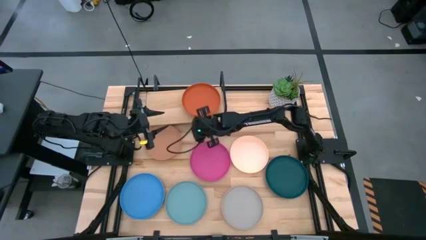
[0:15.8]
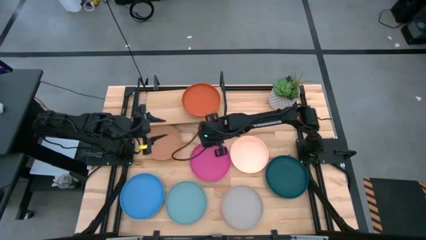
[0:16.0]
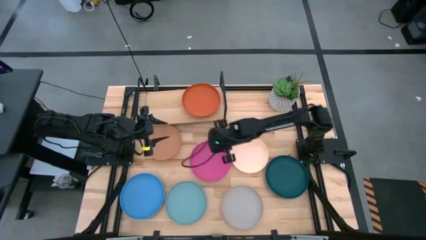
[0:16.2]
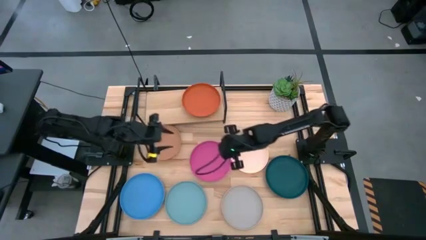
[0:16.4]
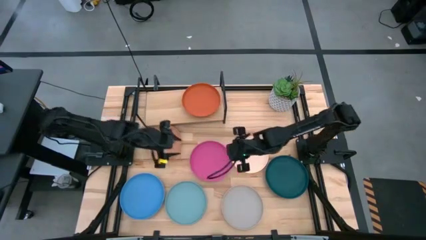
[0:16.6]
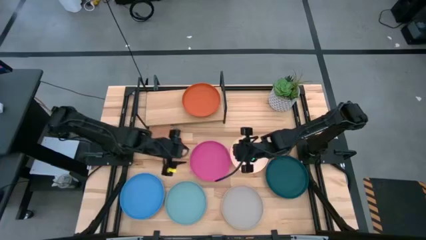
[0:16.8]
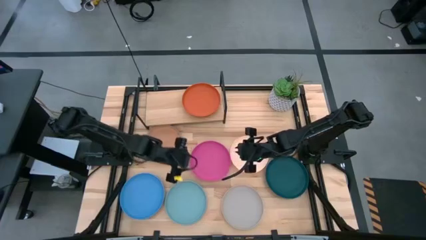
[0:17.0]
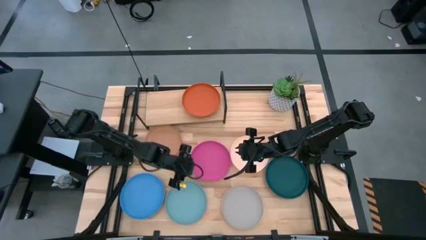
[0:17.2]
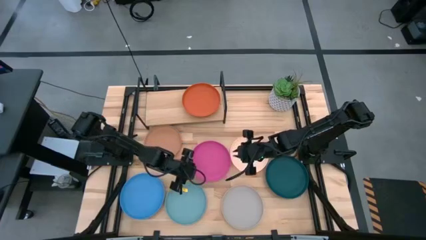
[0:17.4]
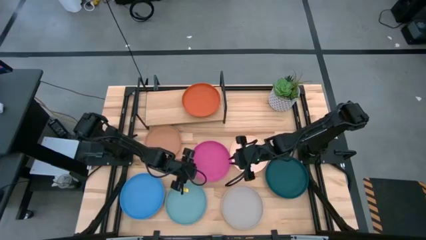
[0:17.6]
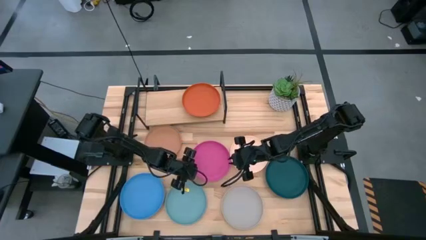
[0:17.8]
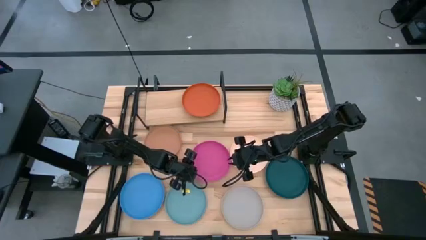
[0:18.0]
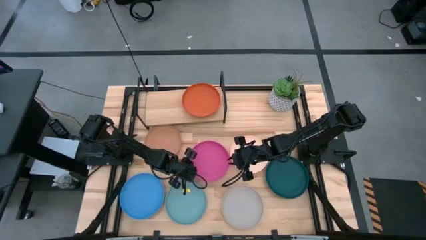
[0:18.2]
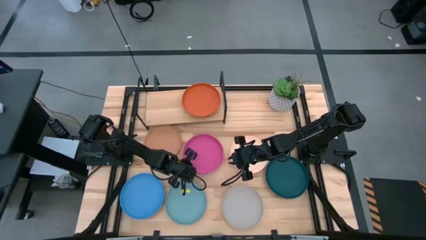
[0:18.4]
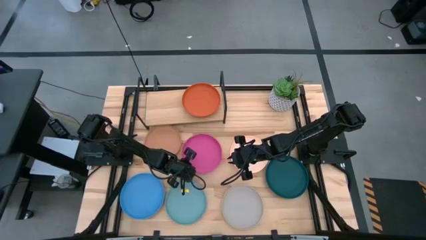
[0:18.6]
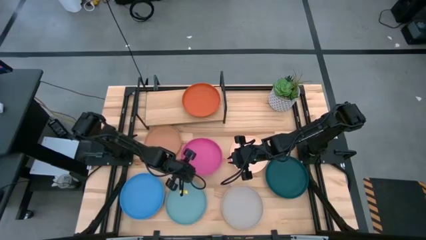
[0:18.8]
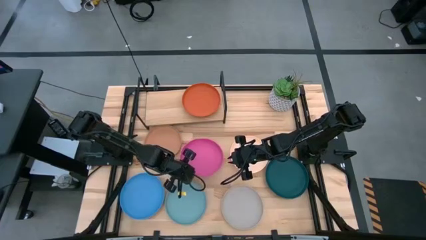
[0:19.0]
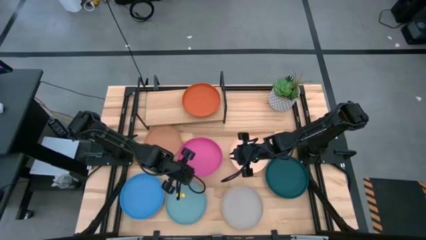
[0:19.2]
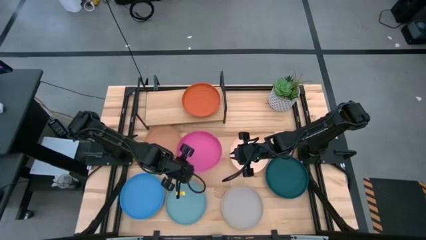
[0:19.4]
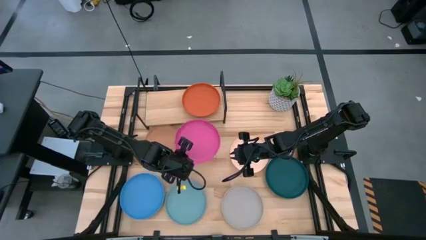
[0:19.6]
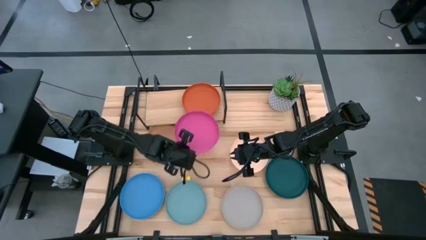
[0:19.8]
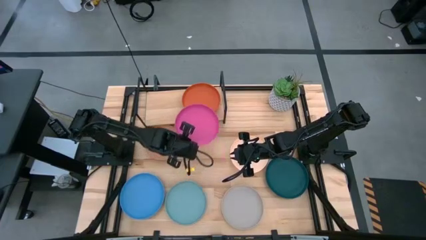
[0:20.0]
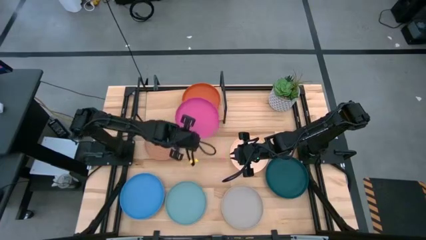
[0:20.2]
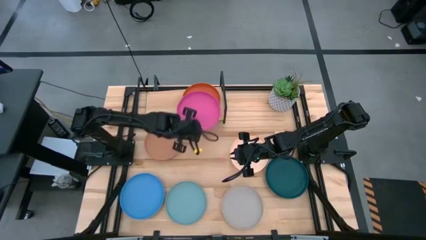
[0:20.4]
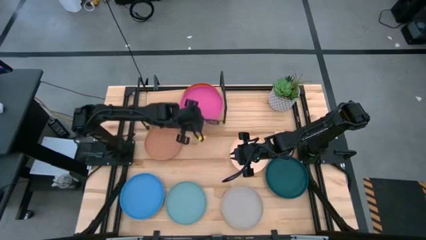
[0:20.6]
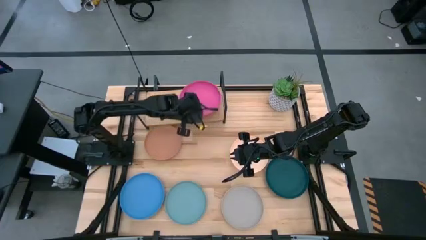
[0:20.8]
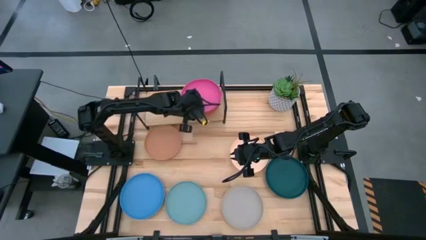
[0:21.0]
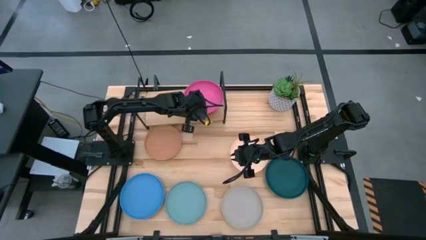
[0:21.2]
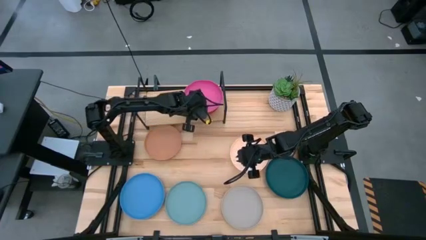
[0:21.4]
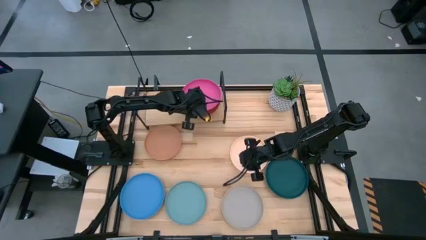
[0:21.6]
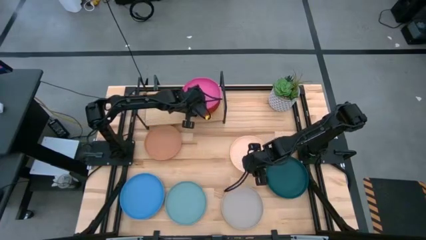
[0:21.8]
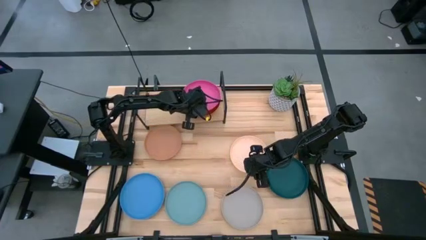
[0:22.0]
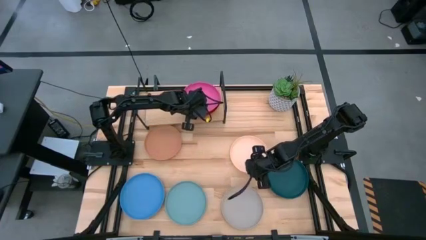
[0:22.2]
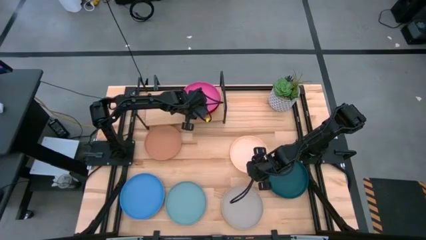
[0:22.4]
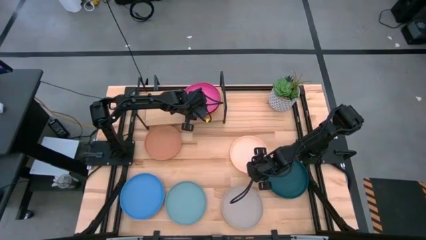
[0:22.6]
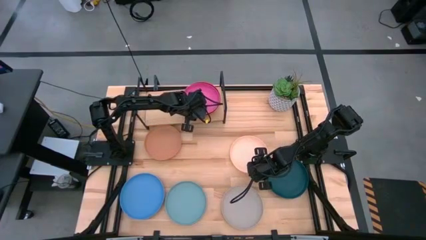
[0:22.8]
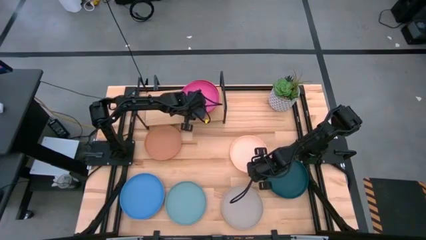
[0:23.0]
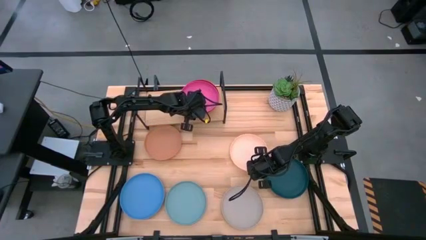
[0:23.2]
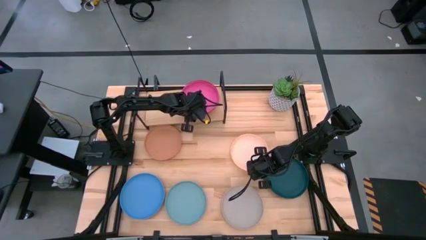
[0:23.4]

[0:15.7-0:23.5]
Task: Place and stack plates onto a shelf
Stack the pink plate on the orange plate

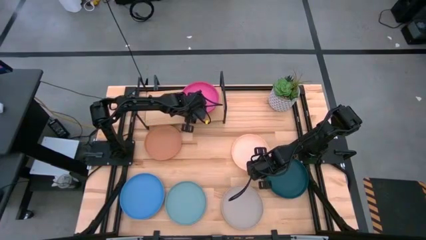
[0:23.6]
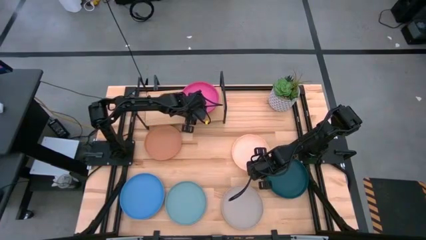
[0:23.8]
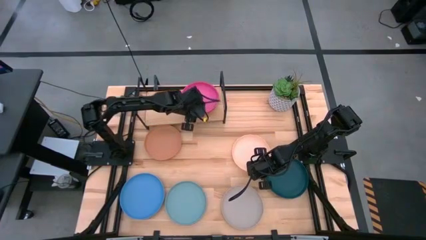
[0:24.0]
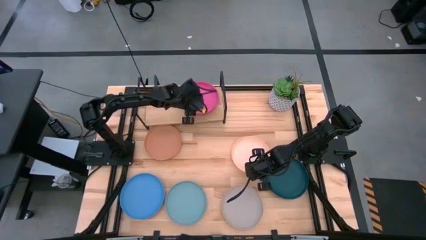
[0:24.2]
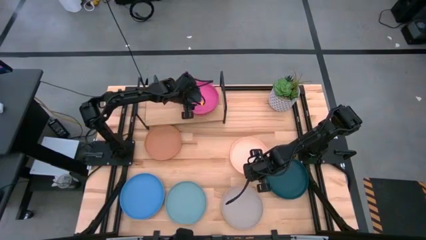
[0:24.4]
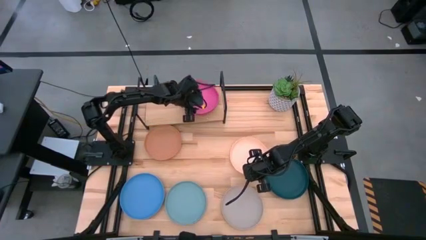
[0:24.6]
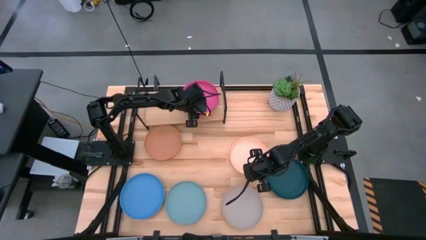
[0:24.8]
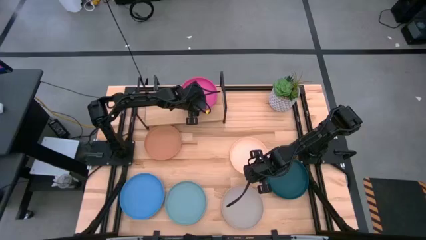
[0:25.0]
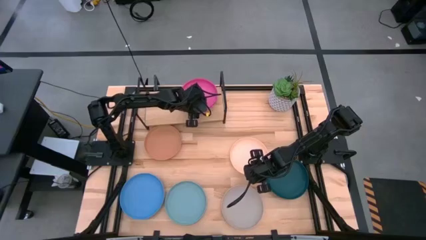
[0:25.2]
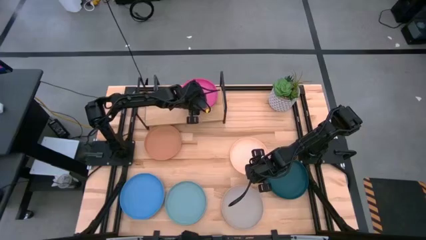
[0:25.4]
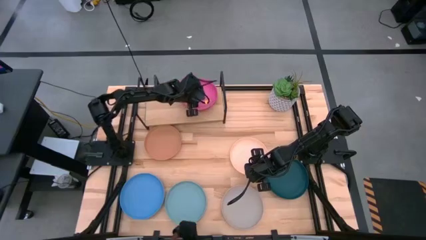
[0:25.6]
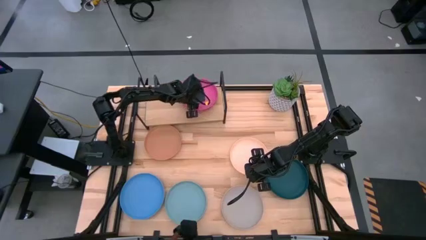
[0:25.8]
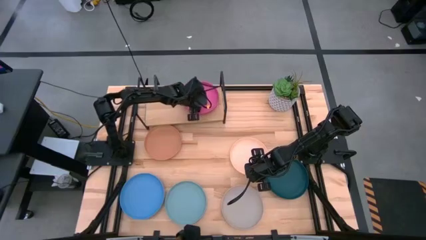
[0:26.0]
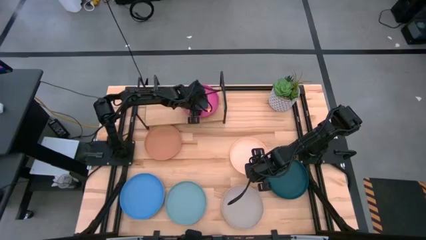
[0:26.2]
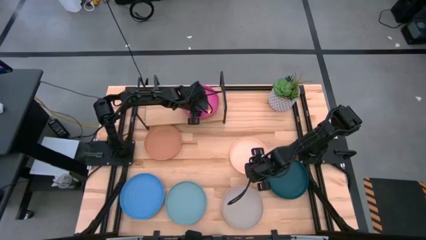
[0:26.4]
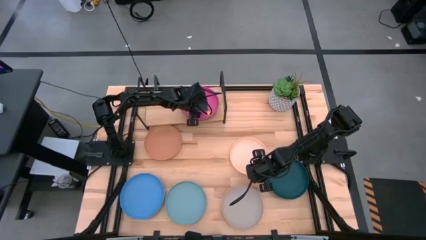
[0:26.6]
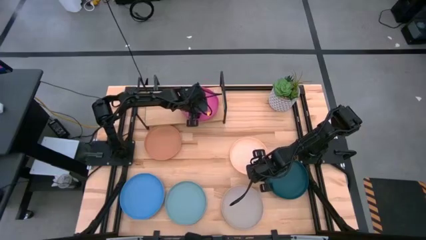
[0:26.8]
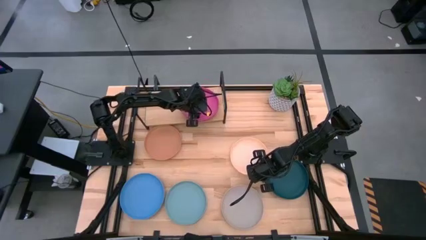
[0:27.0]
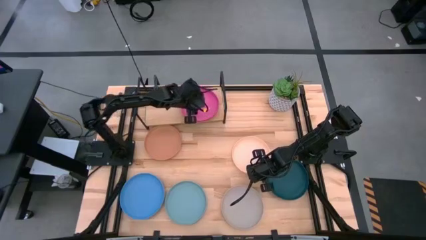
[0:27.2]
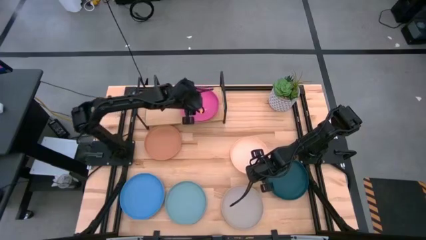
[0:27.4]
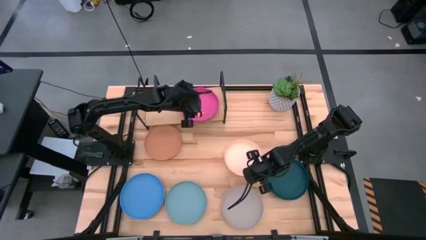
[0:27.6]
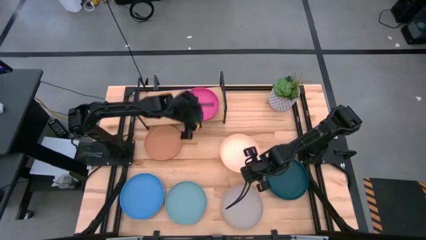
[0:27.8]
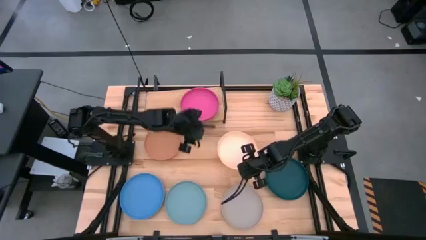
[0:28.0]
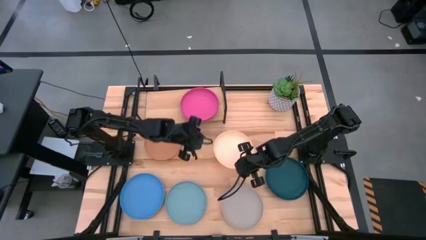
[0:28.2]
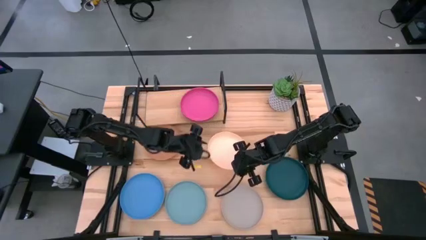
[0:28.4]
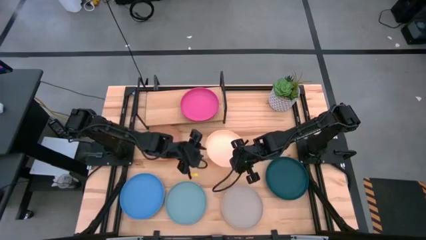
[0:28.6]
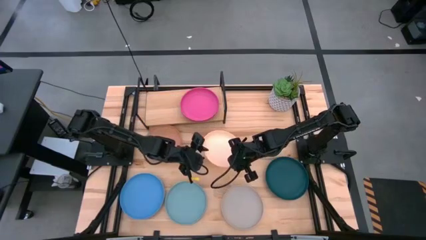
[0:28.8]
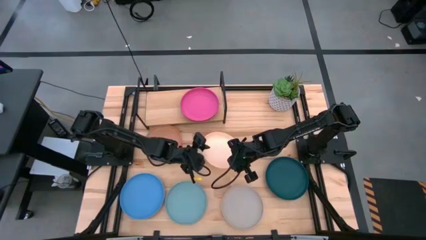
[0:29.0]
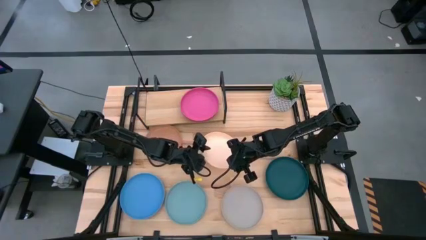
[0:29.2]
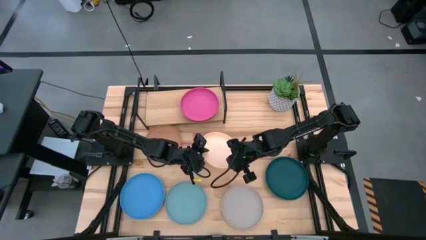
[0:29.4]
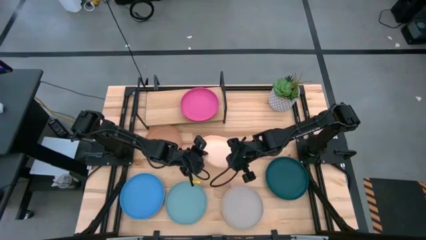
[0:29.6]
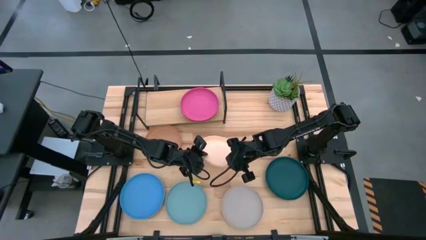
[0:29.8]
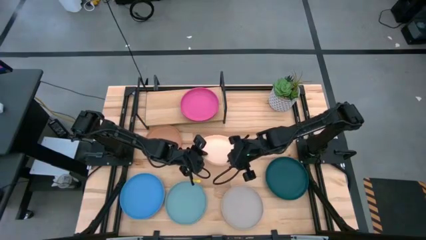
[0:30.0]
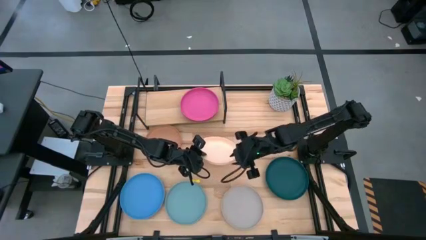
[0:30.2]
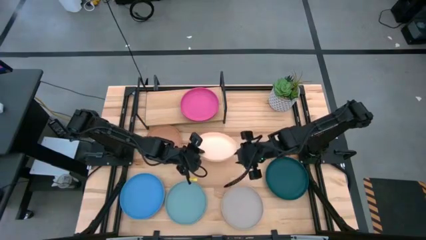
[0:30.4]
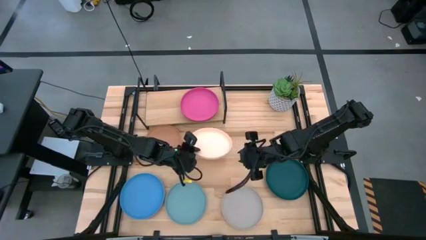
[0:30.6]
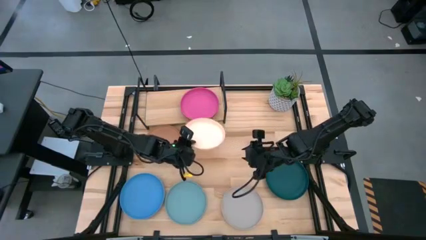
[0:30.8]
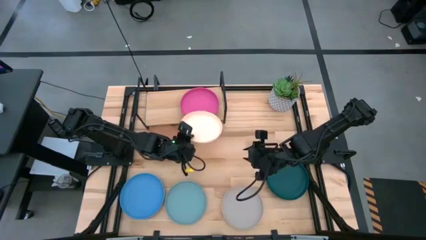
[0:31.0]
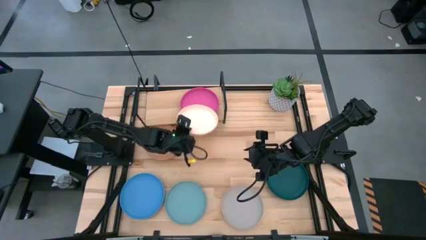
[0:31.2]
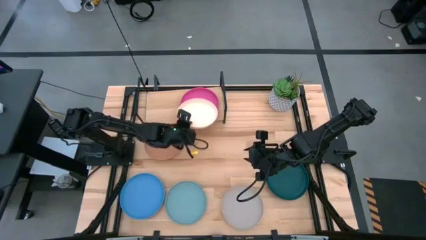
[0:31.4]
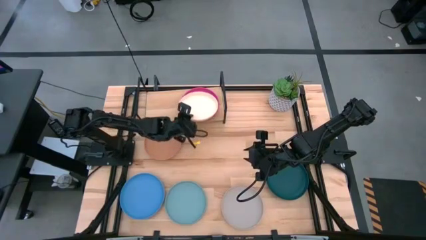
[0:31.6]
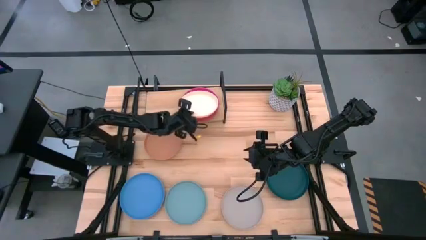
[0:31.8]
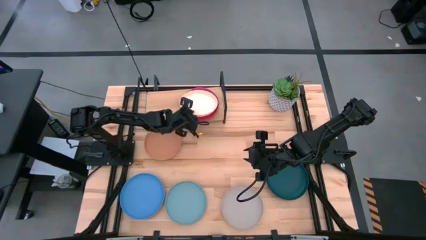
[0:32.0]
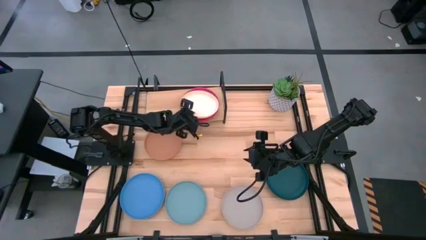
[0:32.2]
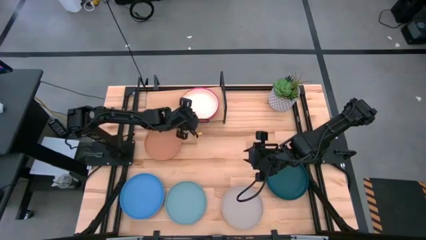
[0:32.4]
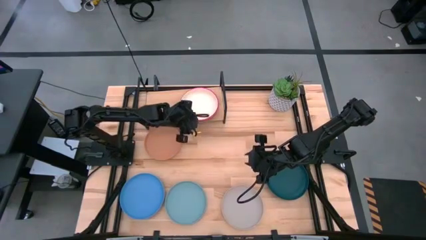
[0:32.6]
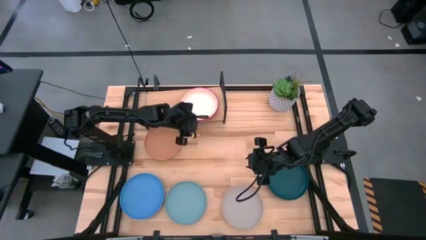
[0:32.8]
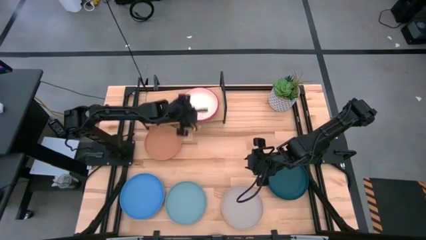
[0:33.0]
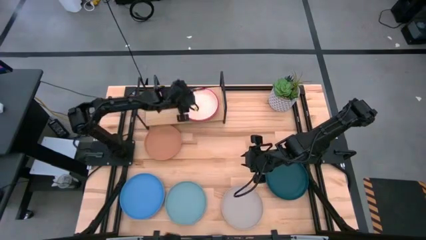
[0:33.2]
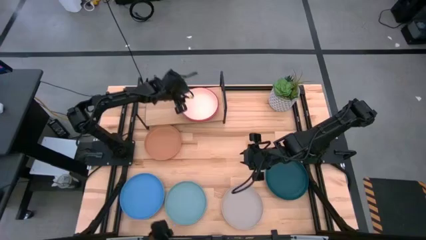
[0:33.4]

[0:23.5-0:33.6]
Put the white plate on the shelf
